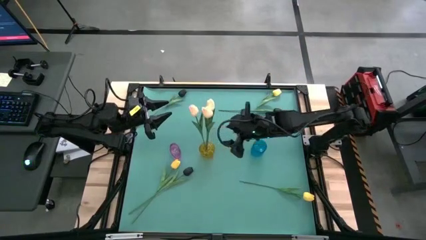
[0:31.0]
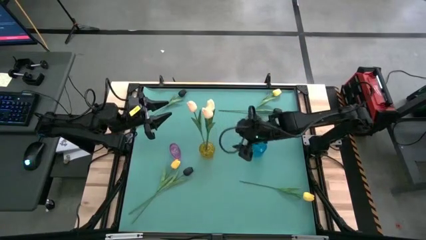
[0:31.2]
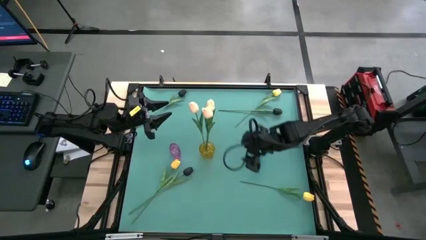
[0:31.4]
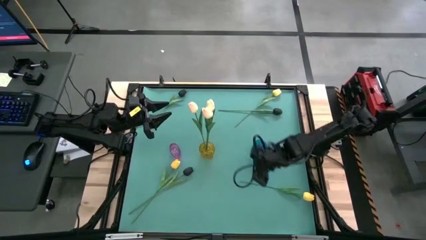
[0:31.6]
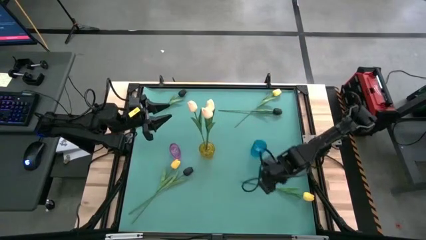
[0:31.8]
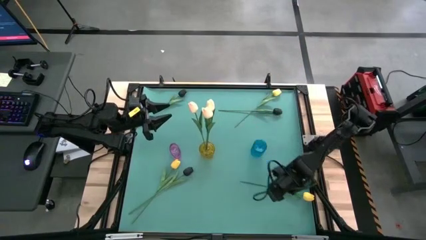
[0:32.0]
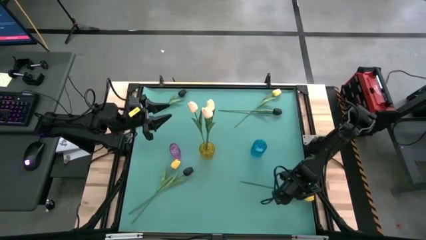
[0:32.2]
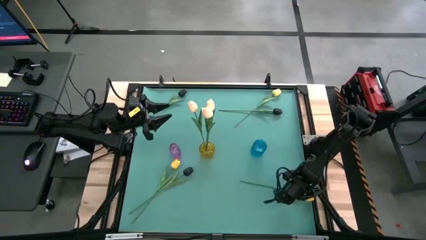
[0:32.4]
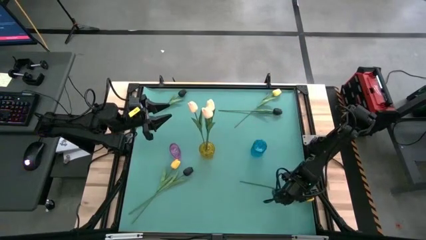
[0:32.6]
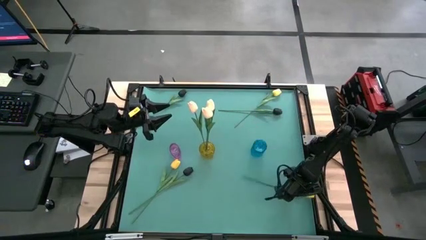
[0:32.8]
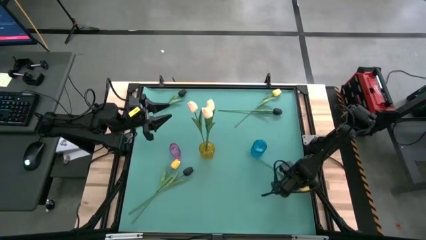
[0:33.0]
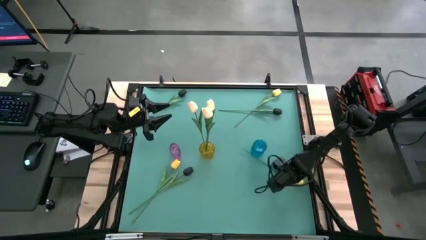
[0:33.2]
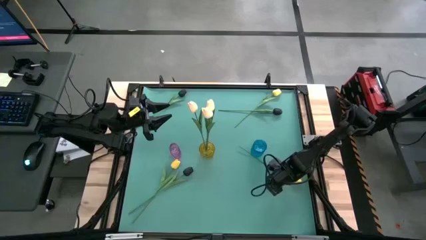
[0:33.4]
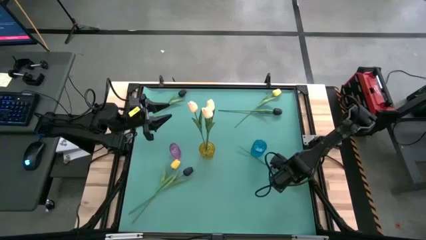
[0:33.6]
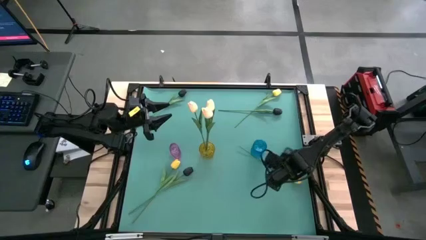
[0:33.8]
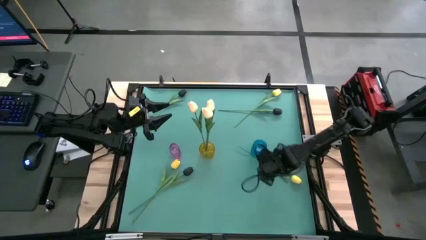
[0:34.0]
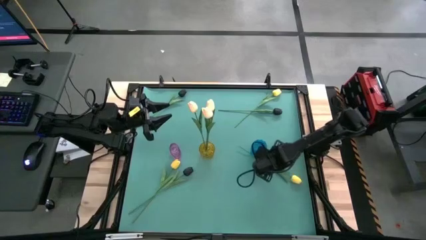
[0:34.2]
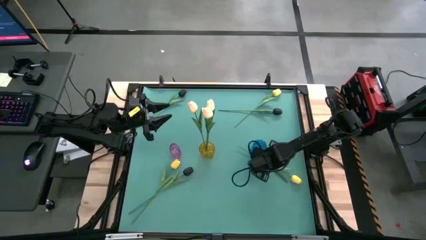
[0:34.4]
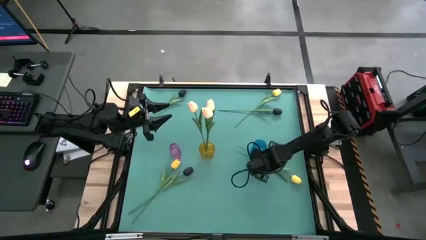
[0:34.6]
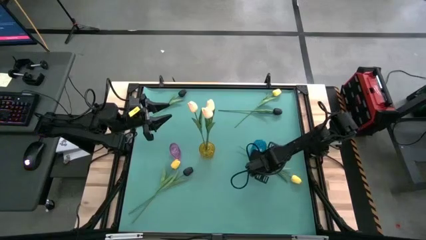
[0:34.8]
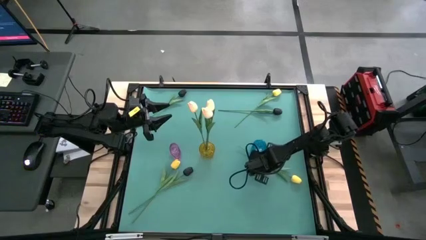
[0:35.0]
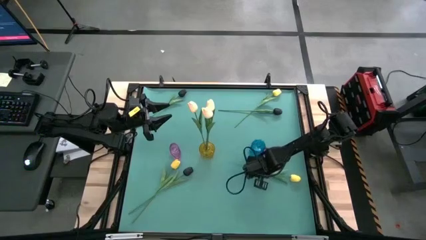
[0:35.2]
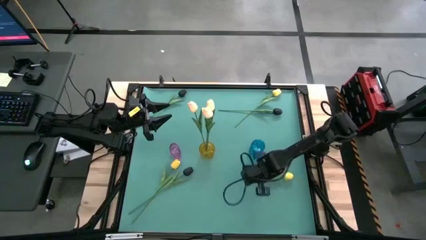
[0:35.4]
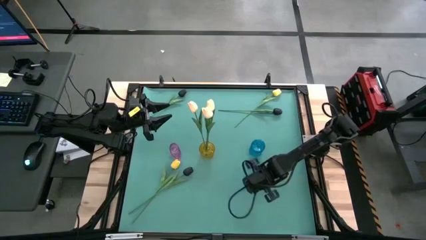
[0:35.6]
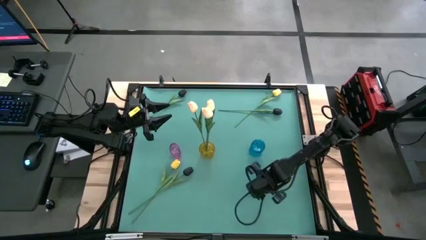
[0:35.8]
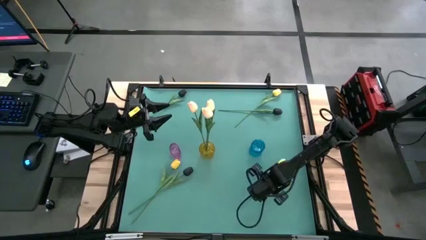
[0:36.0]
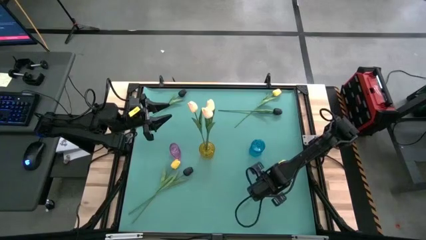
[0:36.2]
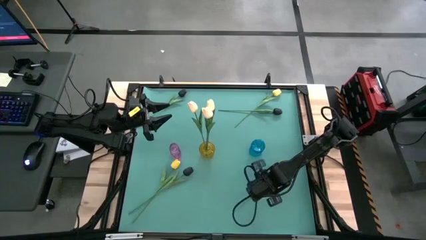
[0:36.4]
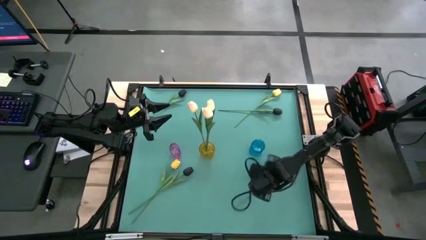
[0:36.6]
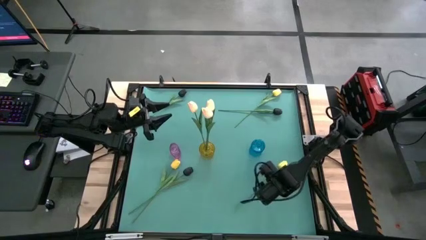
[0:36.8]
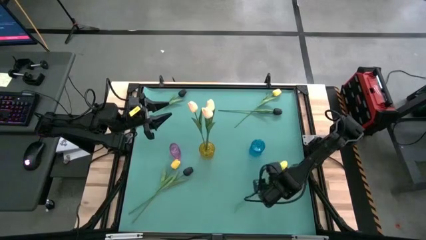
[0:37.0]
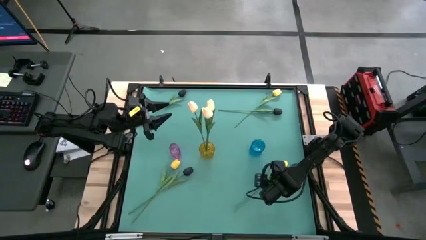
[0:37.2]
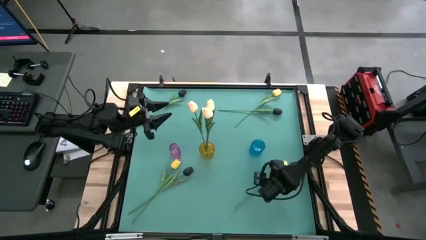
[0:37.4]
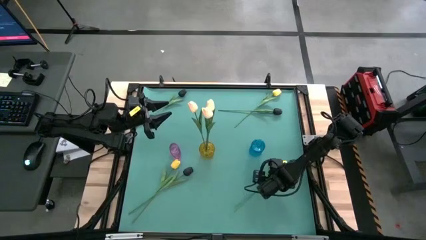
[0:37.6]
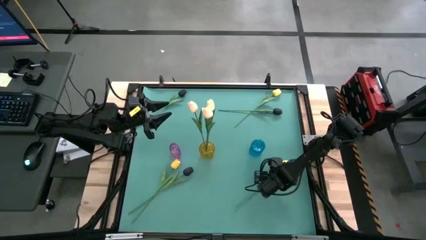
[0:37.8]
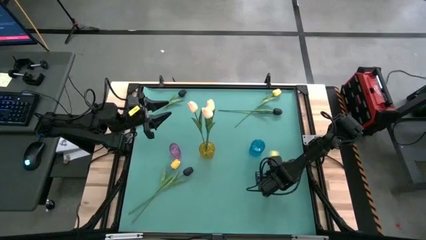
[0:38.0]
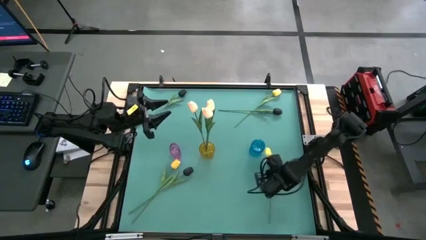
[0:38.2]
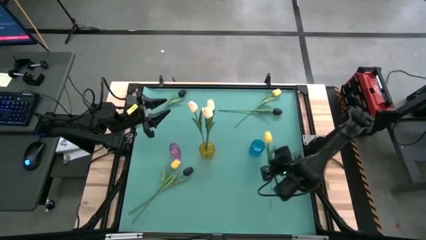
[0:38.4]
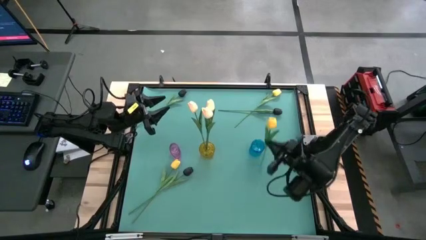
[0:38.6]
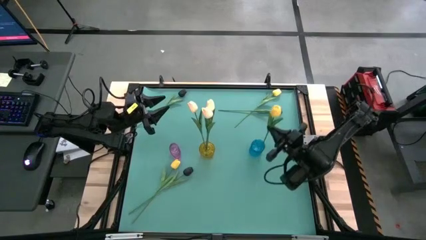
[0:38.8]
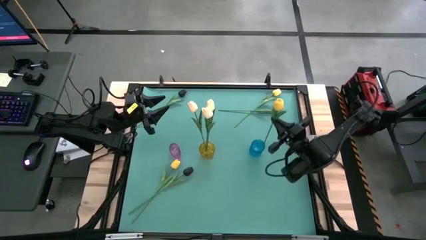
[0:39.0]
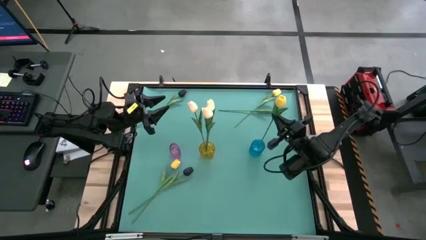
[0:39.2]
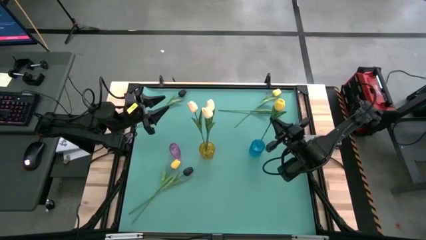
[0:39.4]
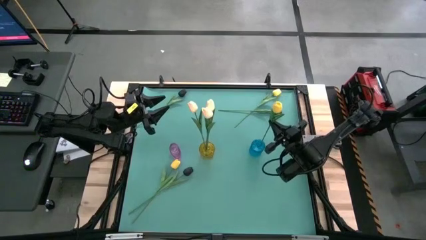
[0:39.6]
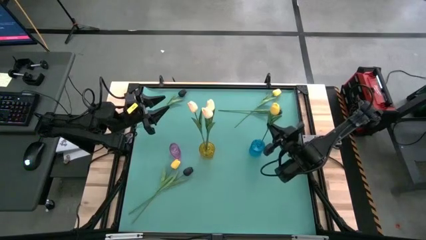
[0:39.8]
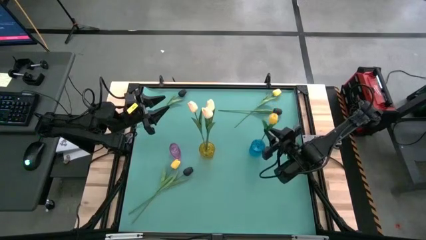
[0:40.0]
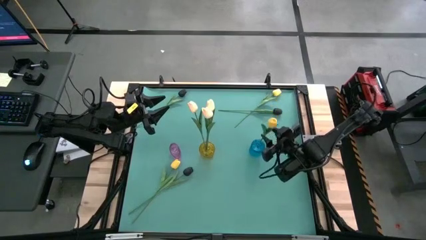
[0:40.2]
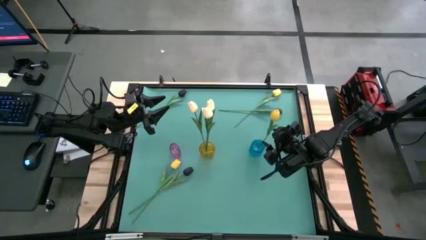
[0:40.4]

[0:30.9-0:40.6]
Task: Sort flowers into vase by color
Put the bottom right yellow flower into the blue vase

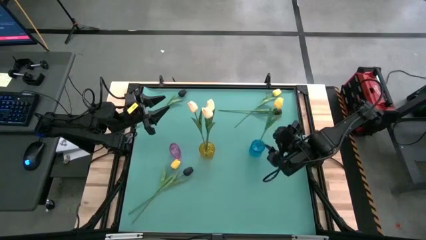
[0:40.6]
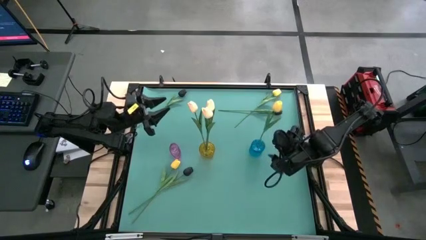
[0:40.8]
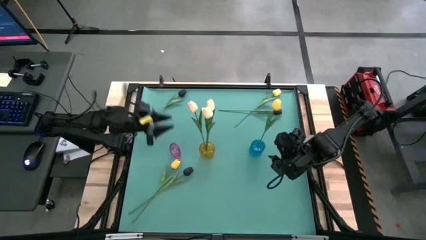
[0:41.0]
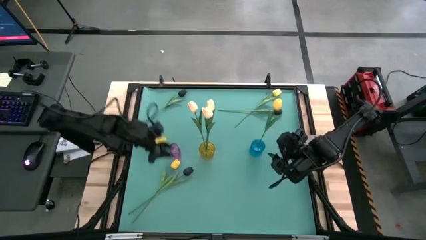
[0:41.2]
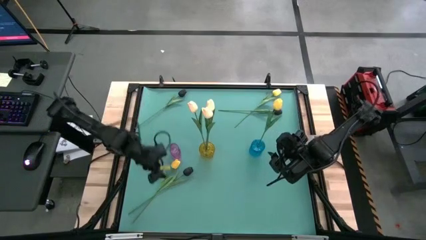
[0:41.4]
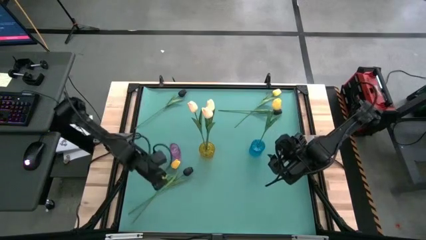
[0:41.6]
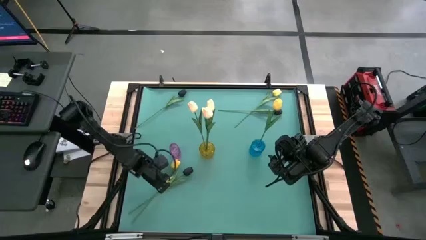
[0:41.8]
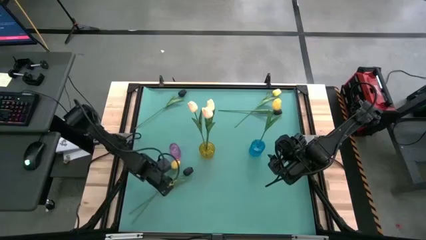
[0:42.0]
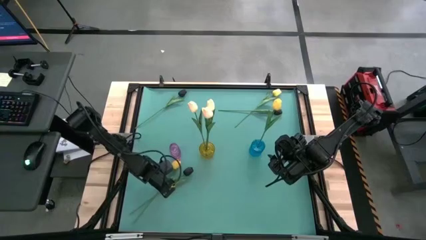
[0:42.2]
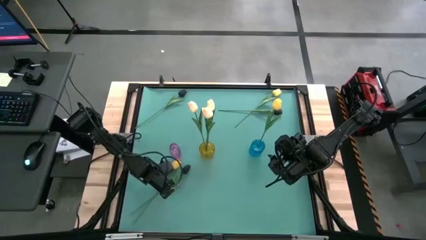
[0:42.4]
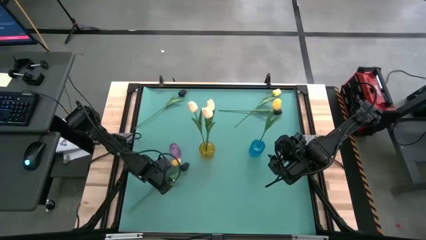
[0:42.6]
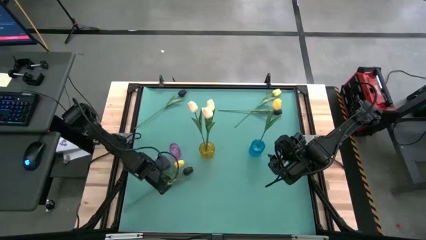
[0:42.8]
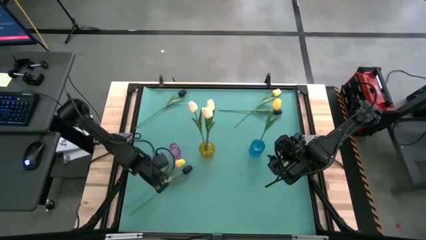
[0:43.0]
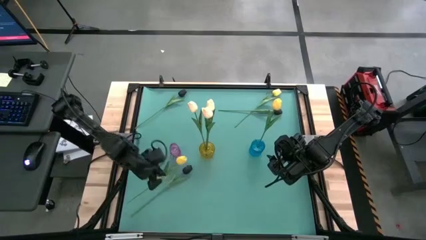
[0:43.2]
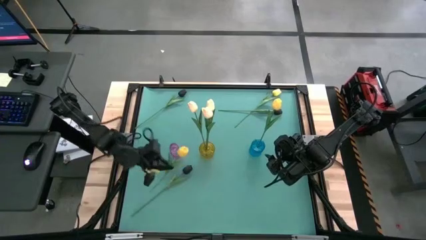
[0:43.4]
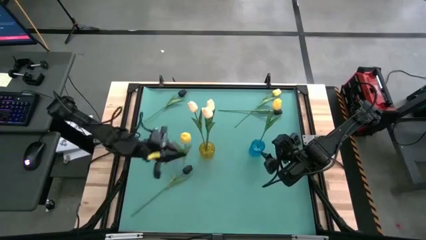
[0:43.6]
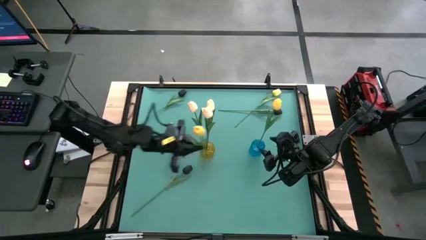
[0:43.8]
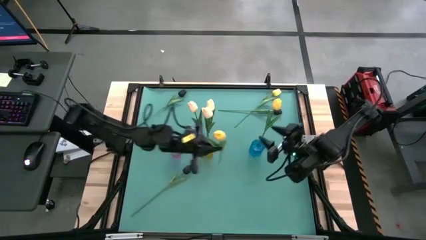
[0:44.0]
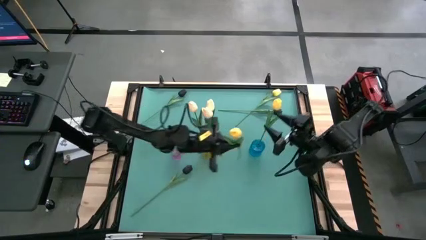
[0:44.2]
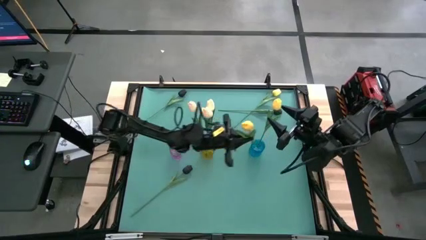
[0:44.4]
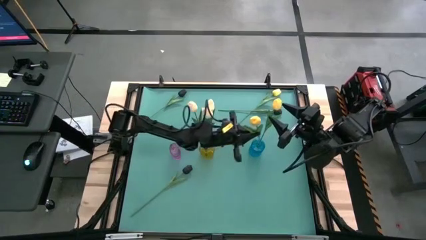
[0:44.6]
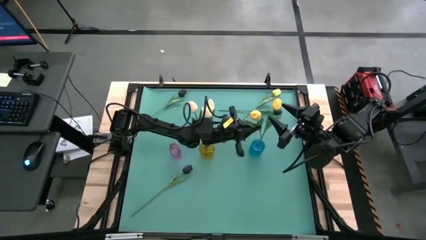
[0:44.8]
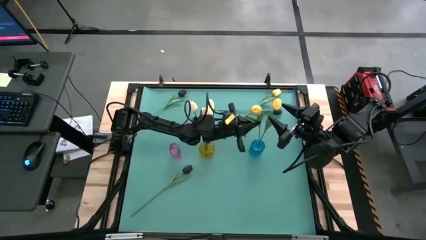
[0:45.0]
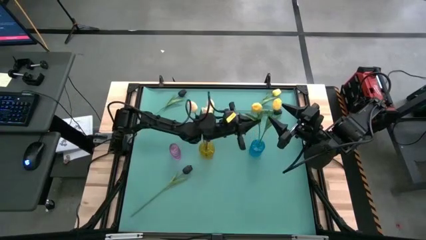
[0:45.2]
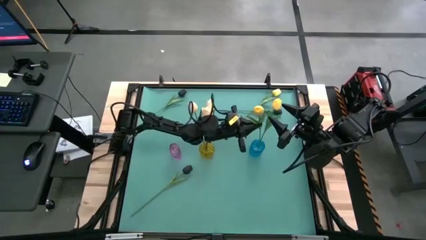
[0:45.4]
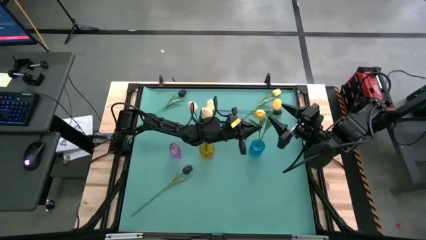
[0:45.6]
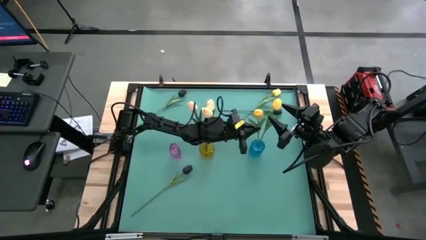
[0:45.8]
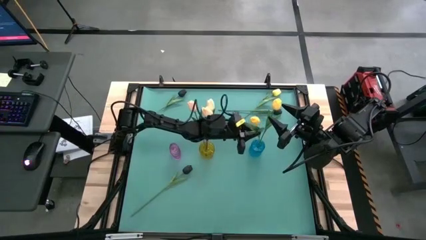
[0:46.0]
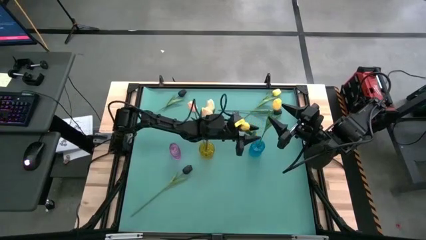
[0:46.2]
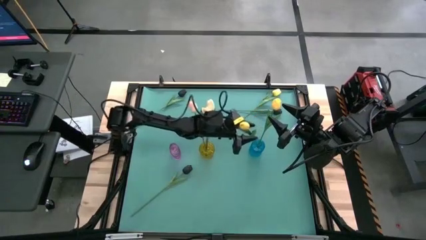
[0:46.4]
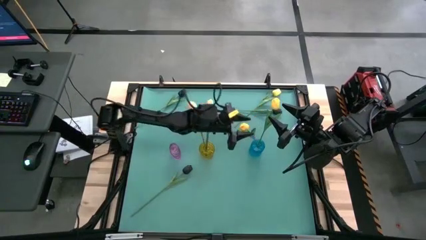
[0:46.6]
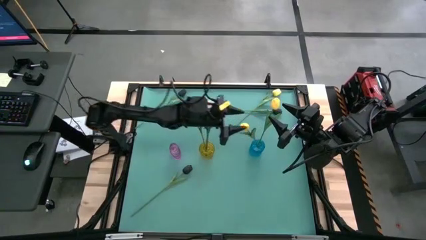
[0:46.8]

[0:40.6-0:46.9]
Put the bottom yellow flower into the blue vase
